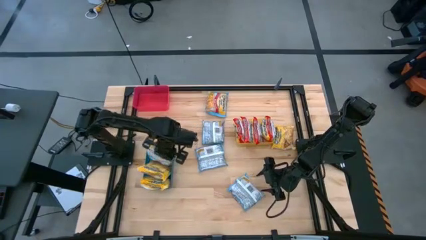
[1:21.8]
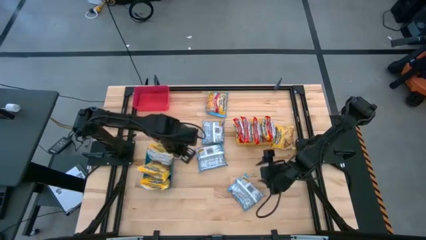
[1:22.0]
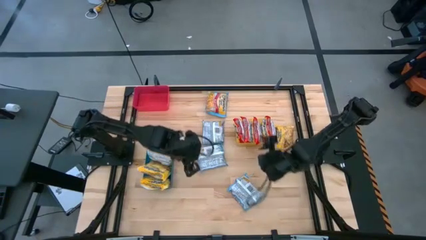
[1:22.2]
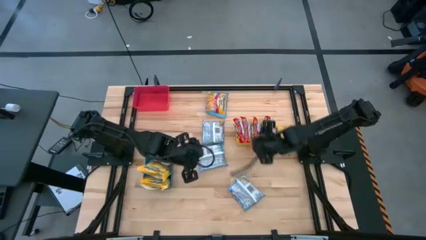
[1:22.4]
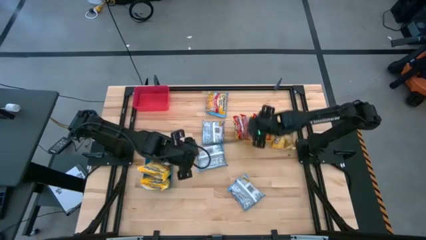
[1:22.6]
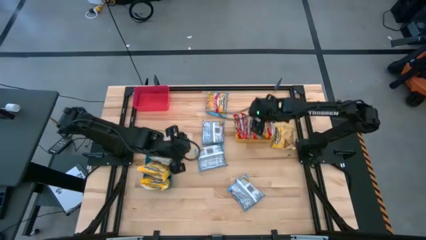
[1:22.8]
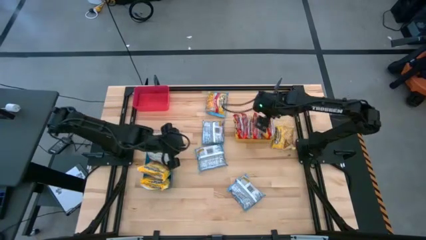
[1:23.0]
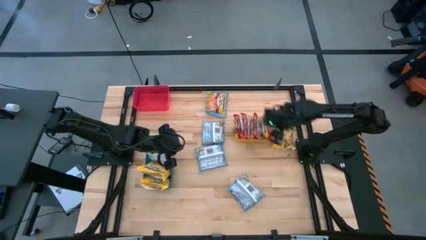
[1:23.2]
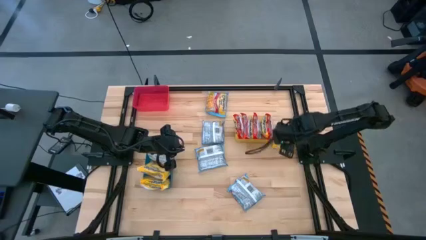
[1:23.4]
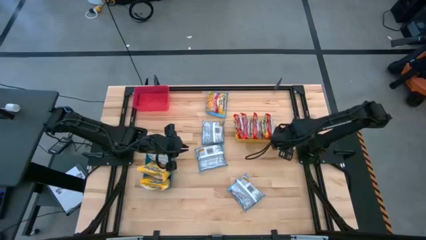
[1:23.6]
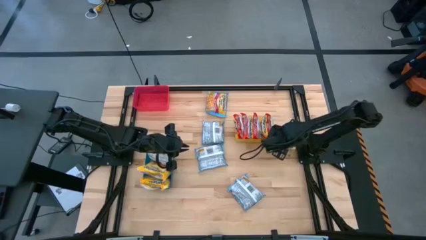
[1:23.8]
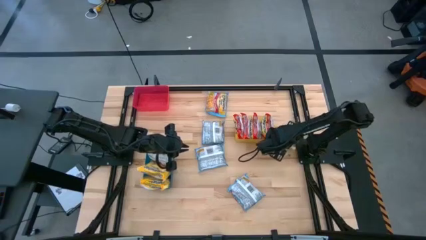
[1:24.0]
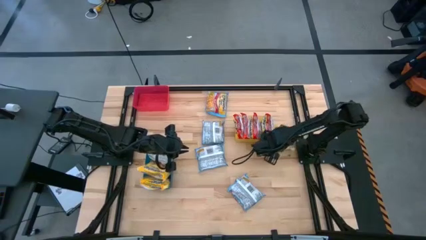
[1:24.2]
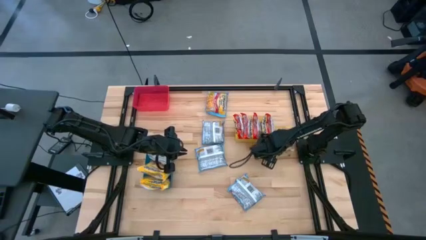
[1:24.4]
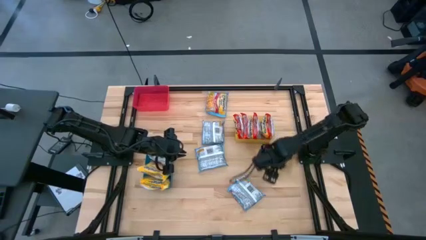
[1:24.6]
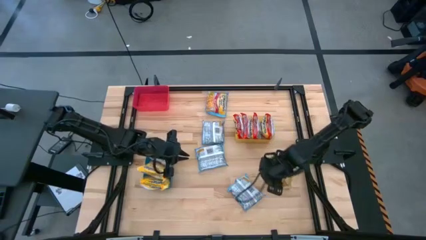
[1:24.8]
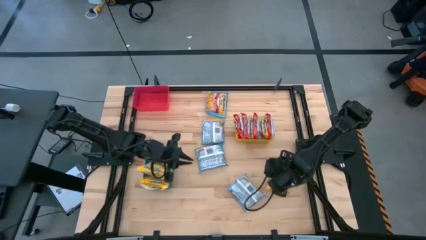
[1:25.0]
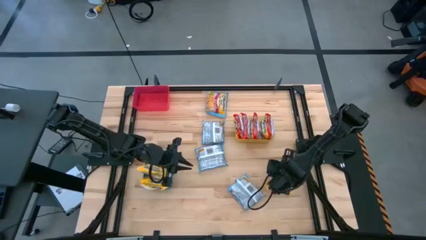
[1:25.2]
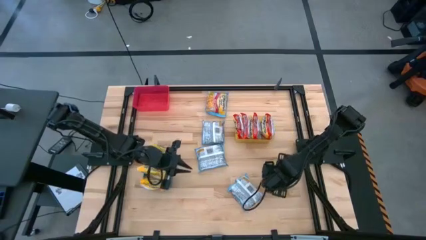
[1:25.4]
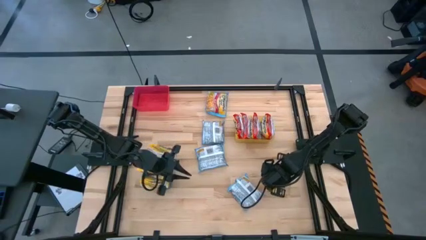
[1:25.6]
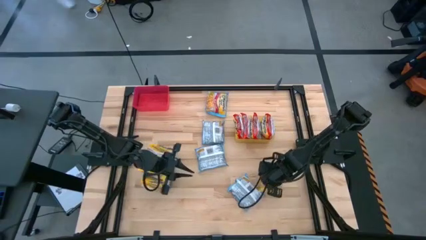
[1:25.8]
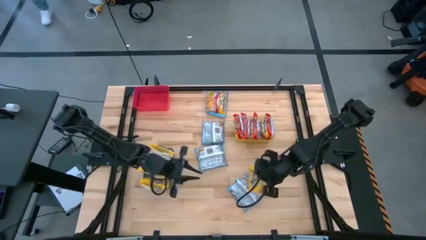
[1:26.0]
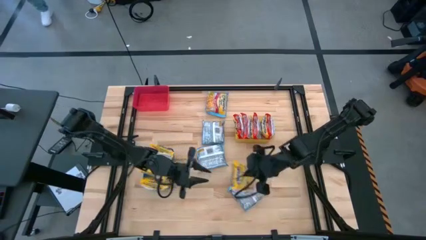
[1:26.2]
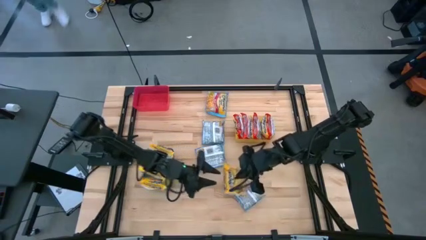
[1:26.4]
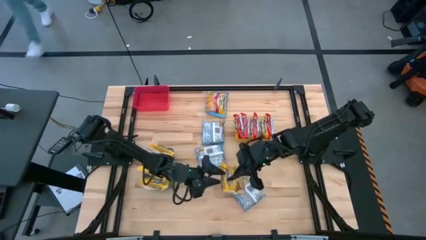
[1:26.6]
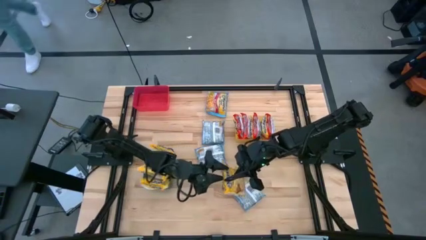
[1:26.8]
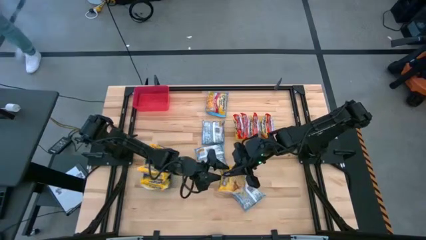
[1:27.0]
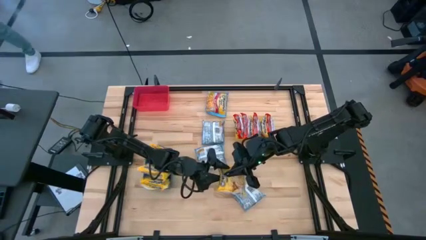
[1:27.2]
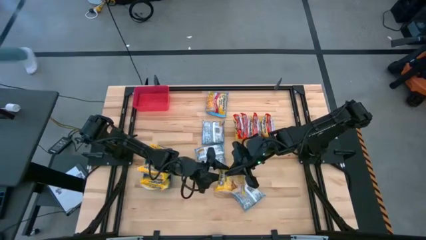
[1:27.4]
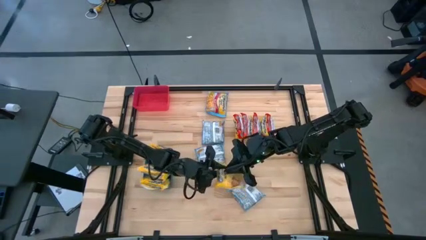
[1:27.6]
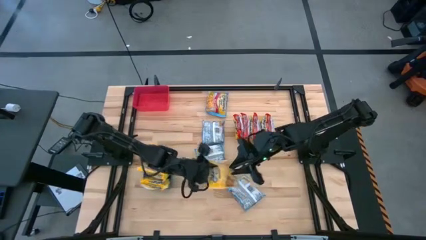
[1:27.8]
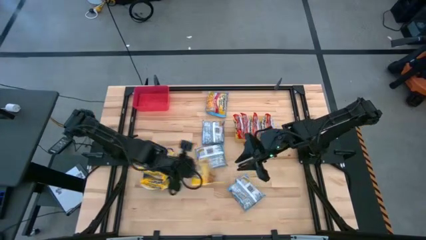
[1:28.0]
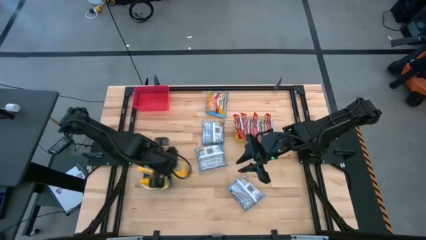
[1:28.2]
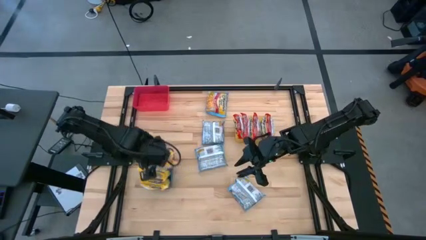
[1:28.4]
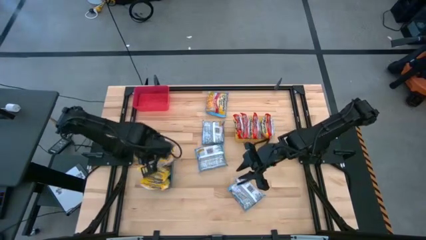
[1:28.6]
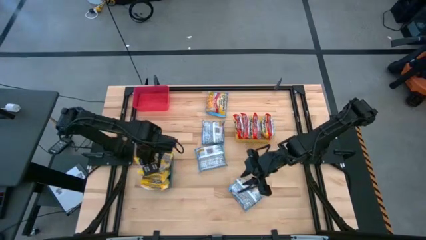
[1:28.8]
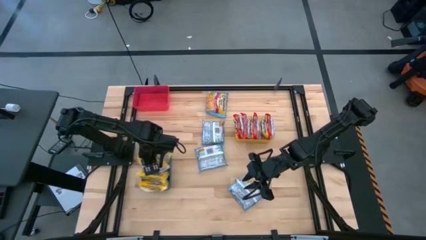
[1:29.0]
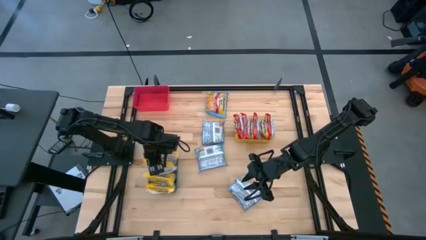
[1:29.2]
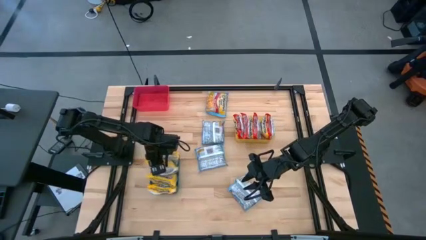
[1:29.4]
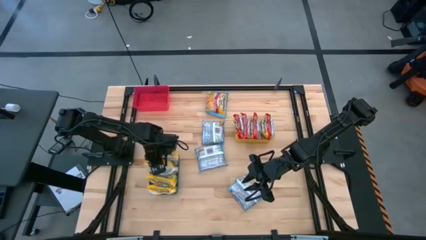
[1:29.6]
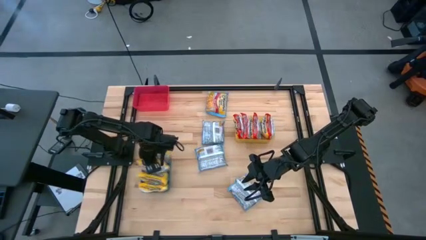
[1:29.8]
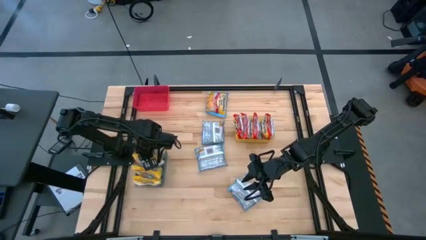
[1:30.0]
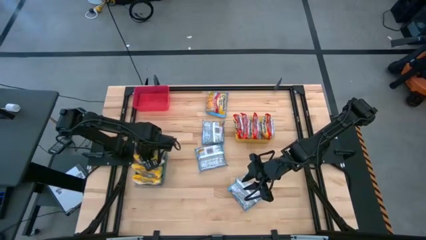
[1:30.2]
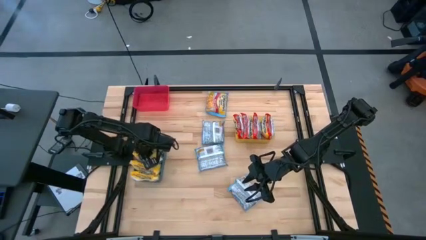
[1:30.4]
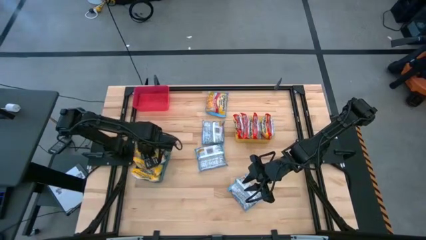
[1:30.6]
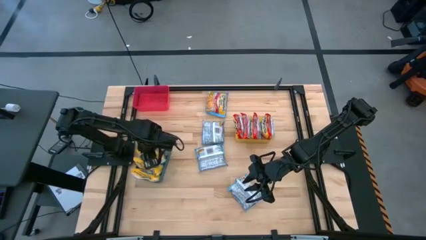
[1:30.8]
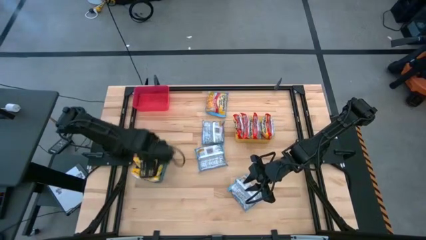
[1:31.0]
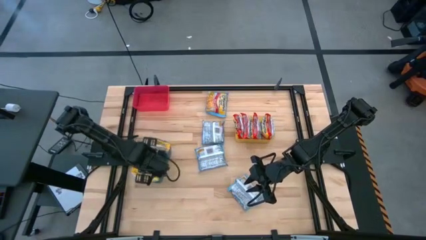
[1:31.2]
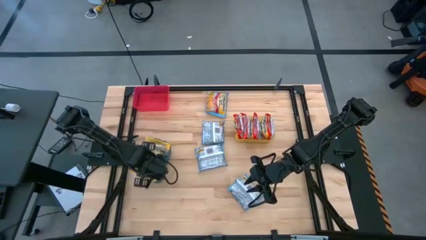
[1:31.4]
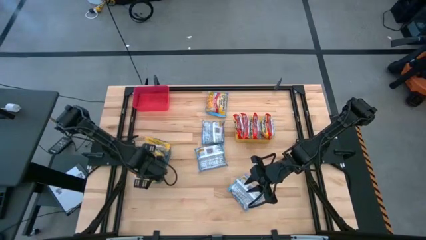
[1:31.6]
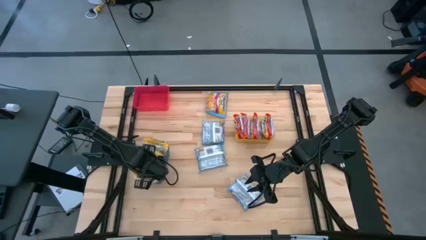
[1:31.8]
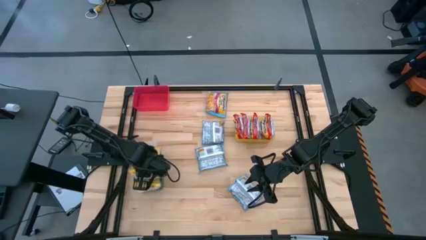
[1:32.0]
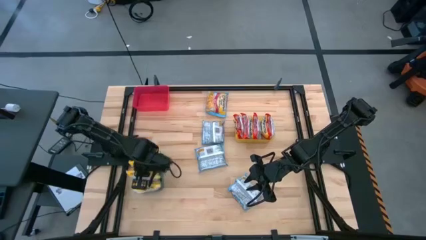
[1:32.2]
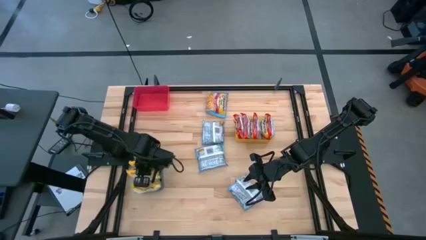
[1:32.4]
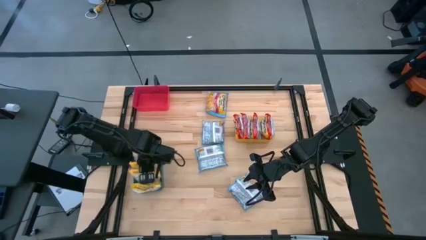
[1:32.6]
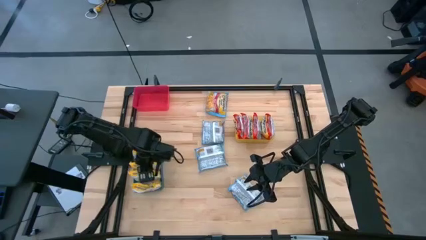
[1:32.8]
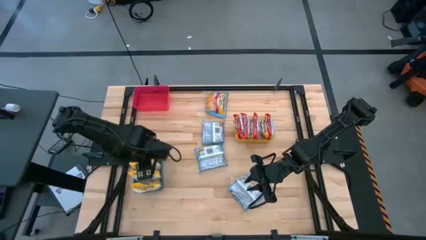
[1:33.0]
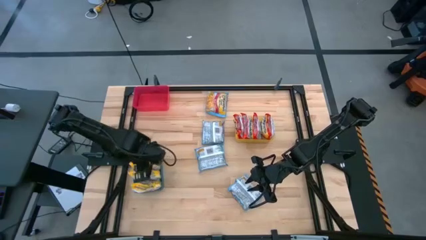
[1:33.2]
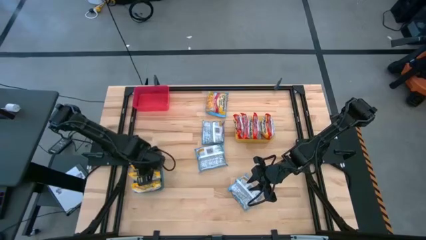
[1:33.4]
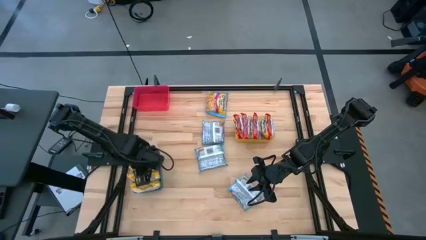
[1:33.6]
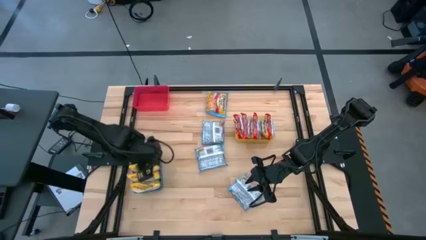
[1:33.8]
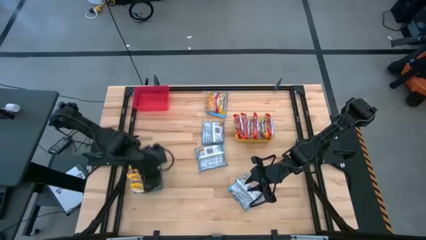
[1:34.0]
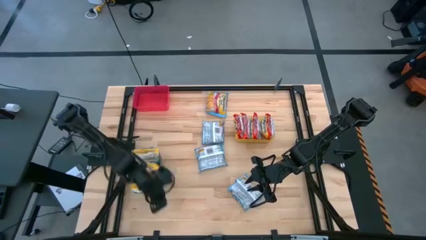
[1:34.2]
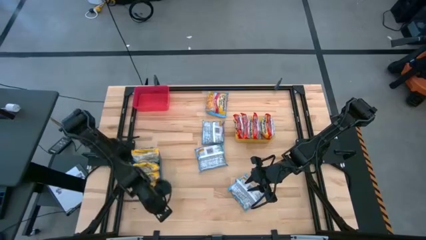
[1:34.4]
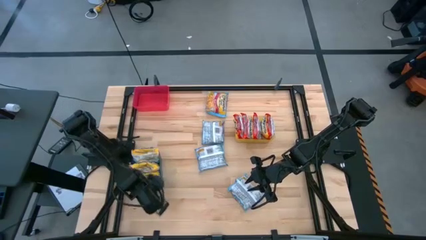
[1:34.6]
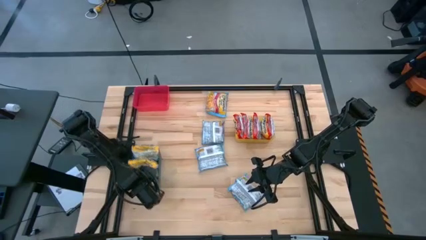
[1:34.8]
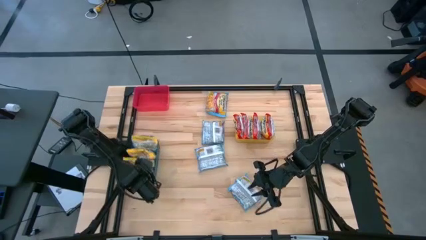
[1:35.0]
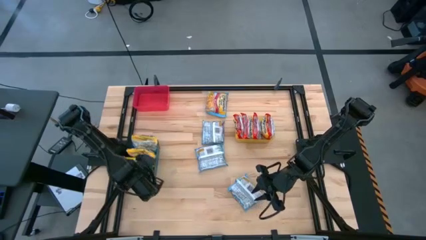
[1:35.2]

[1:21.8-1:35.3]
Task: Sort Maruchan noodles
Put the yellow noodle pack into the blue bin

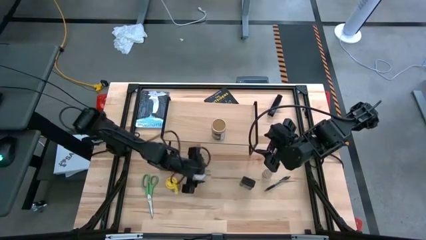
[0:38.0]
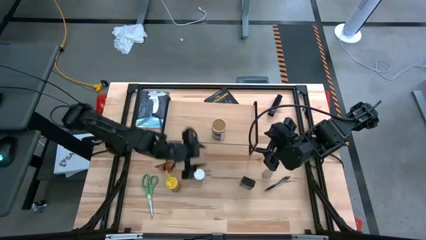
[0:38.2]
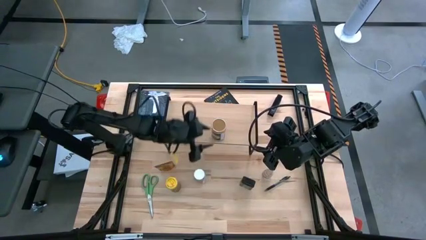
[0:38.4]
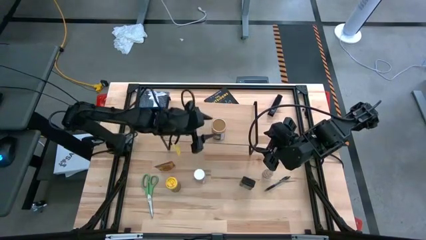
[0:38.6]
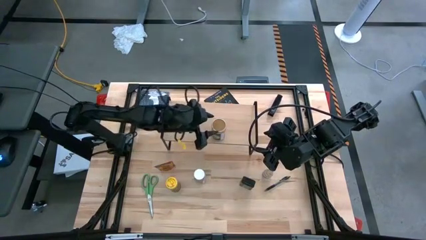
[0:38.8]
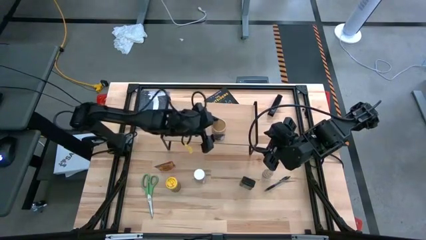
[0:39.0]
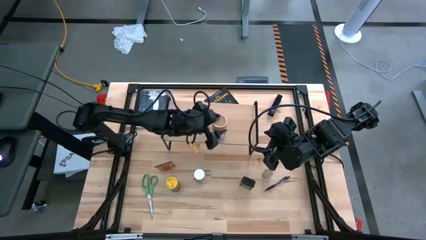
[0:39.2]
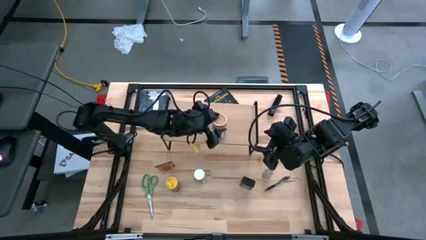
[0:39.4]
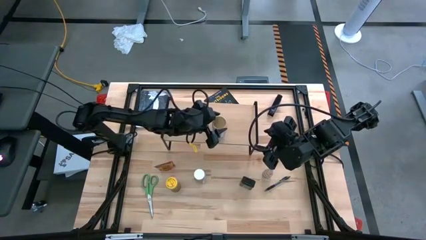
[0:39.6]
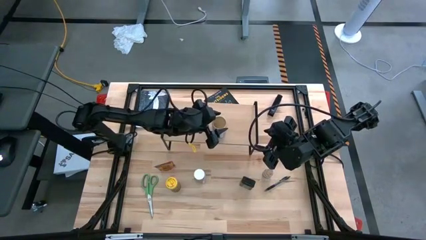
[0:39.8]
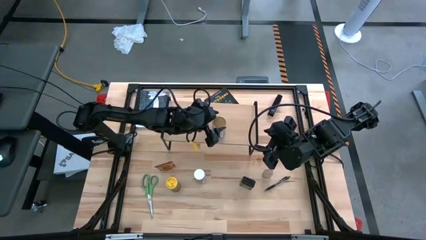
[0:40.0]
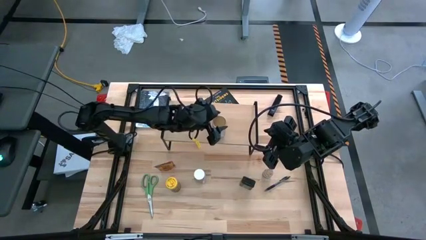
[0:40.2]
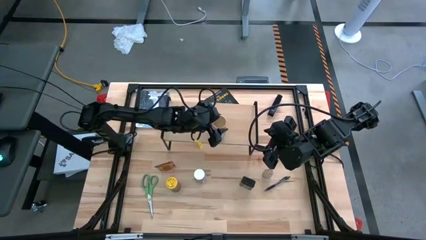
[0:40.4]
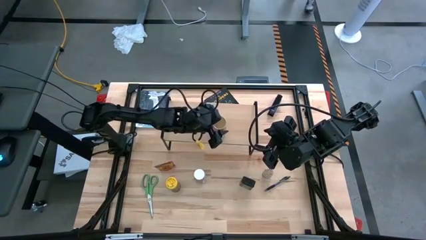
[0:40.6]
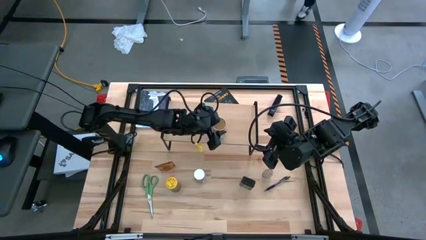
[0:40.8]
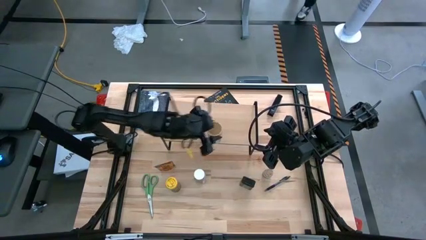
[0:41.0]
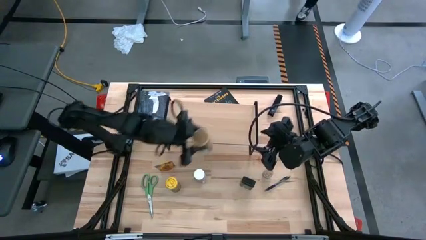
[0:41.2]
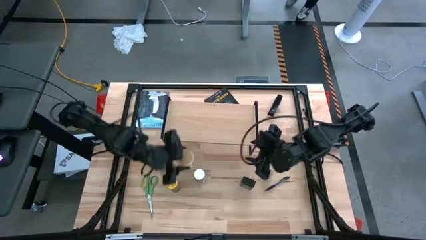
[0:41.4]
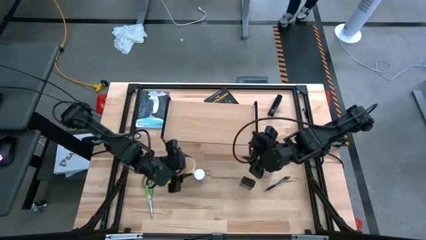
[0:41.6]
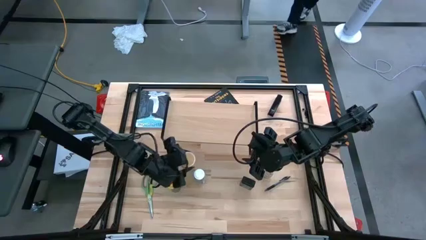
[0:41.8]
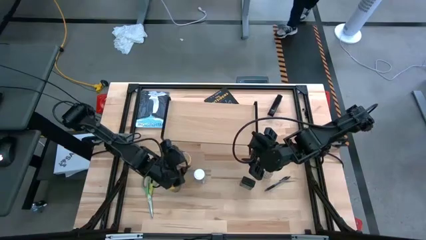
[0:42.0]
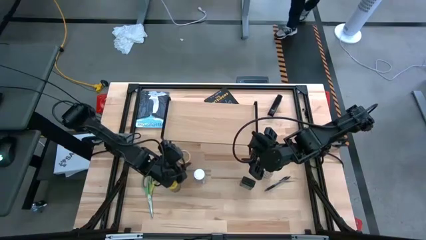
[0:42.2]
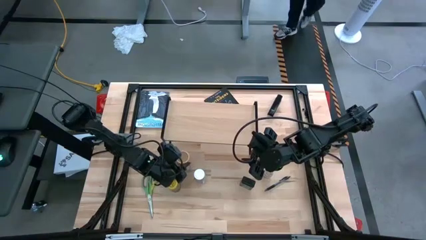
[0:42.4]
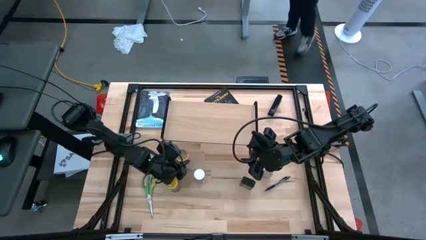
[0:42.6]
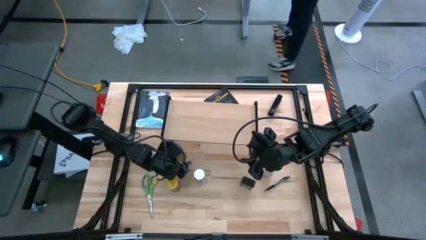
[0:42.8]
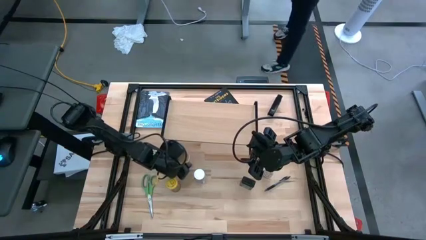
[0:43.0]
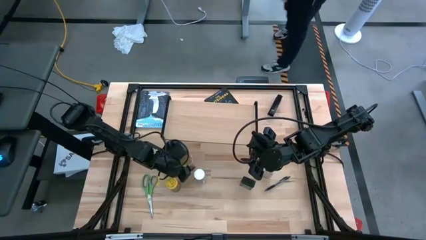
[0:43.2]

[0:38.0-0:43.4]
Task: Shelf spices
Remove the gold seasoning bottle from the shelf
